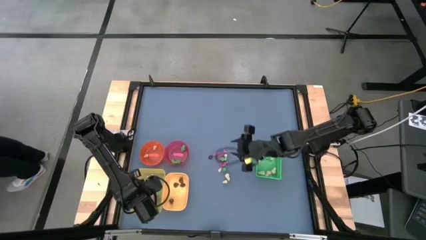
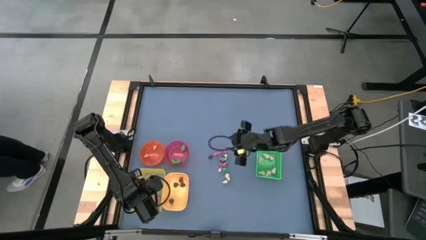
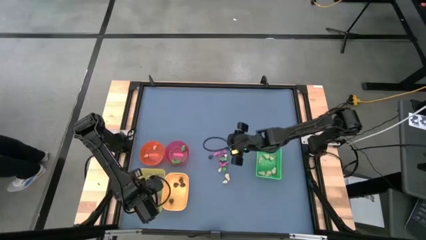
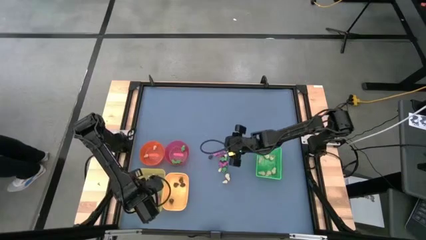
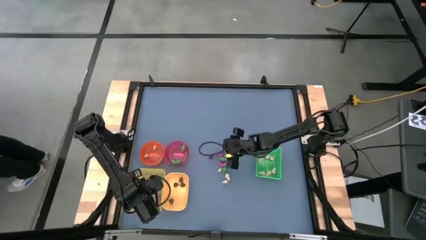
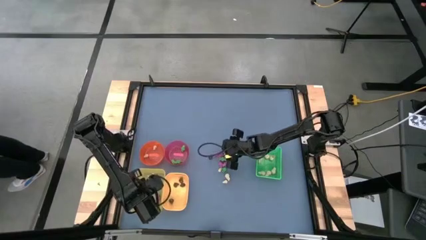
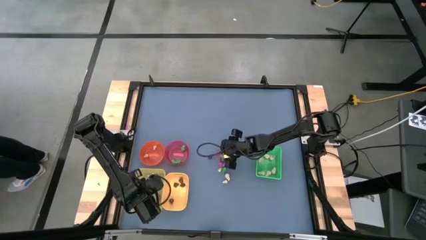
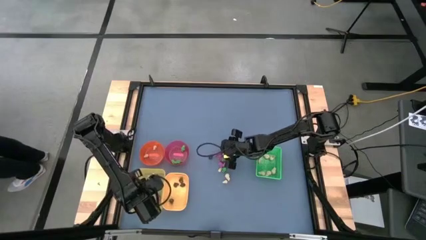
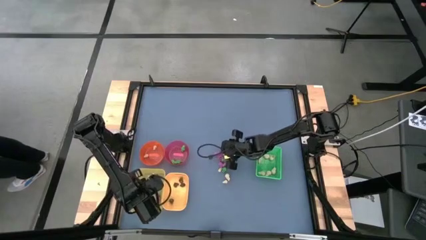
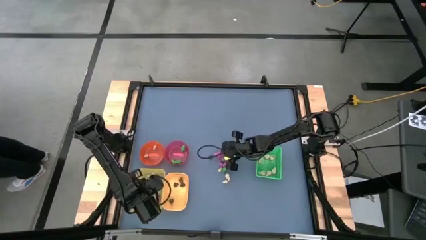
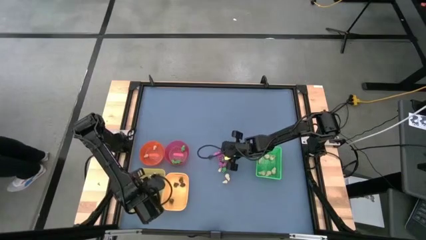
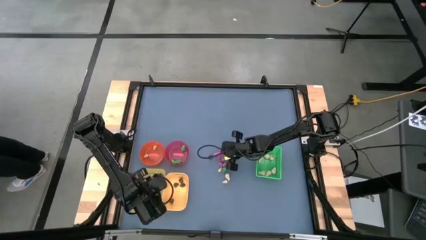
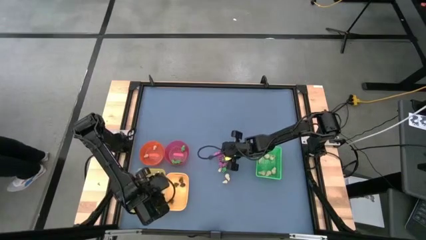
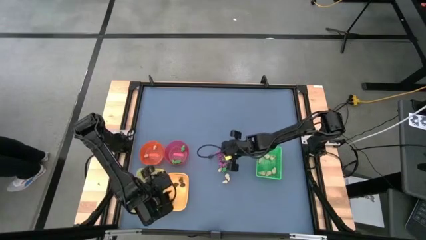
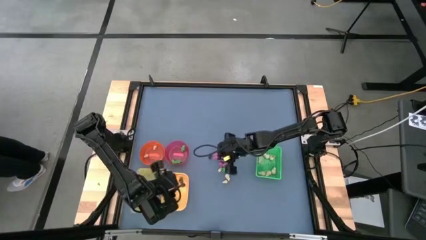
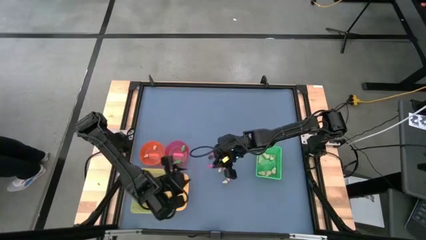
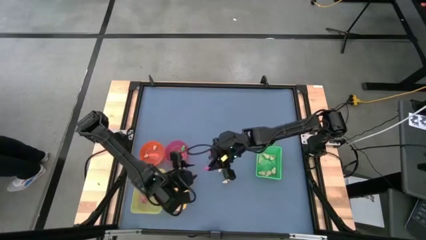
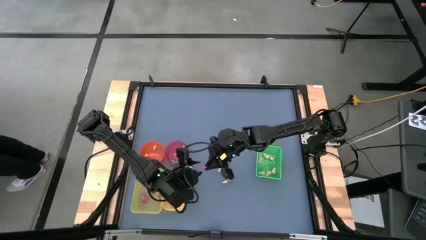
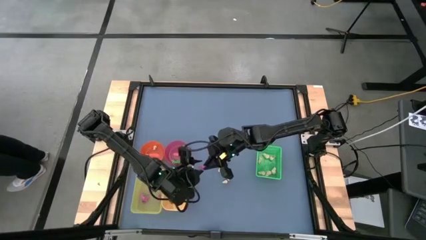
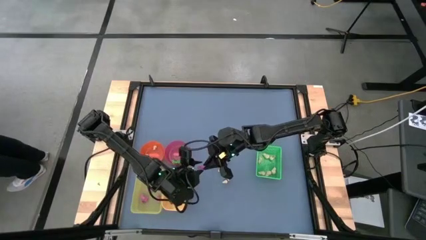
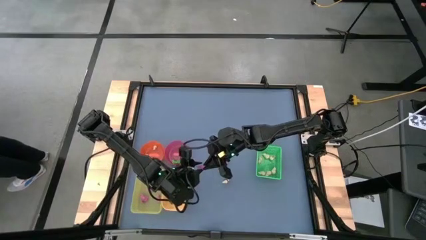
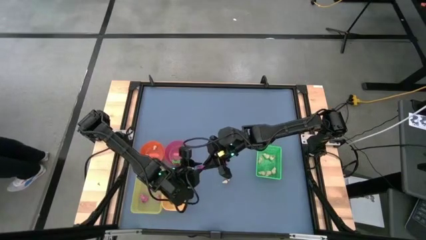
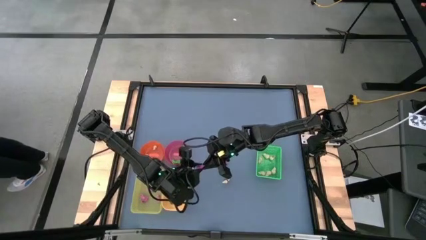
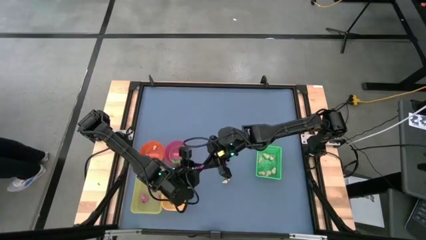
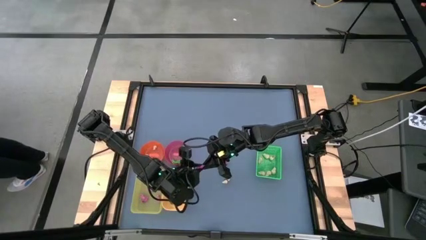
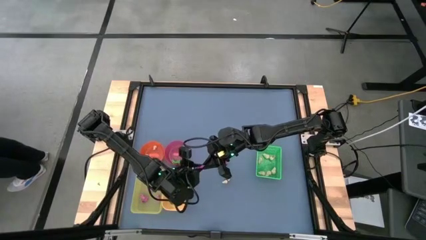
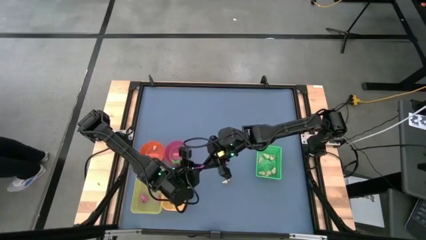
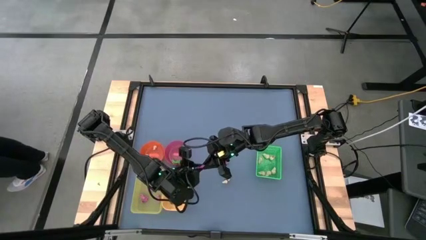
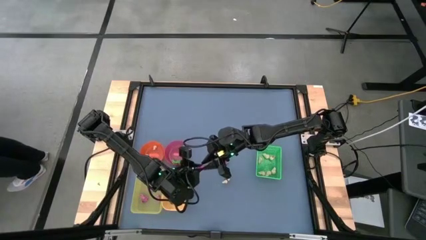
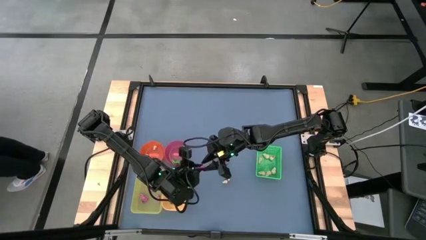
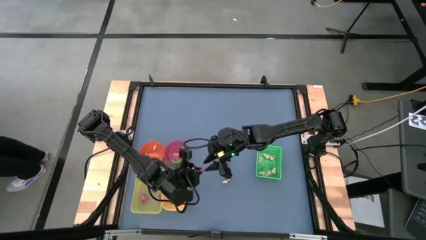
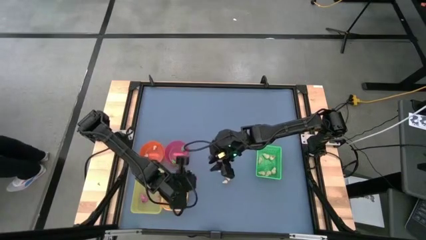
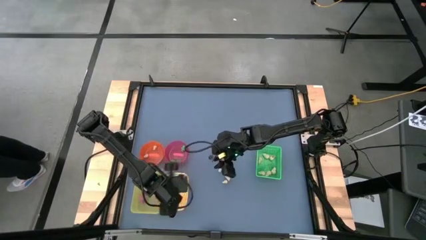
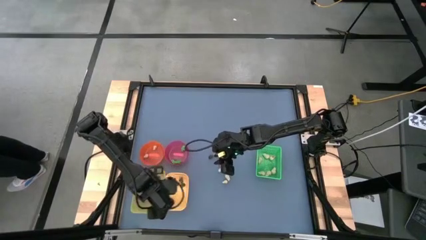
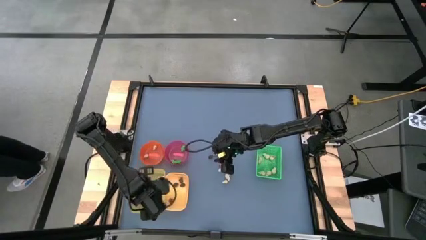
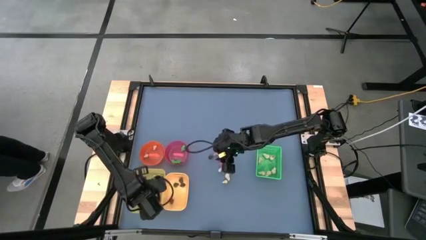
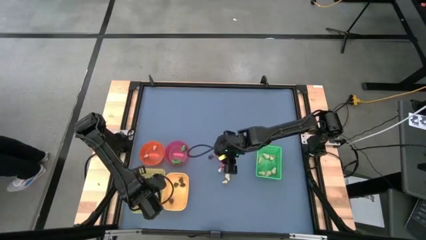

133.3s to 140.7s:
Task: Sort Halloween decoration
Put the pink skeleton toy into the light yellow bin

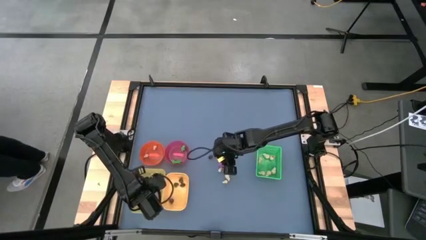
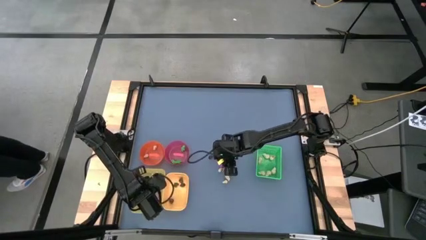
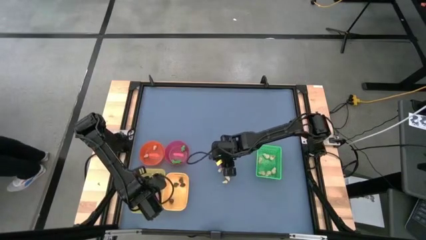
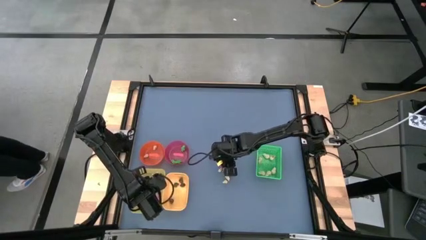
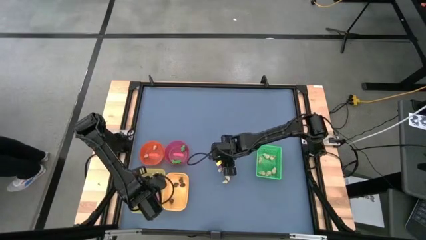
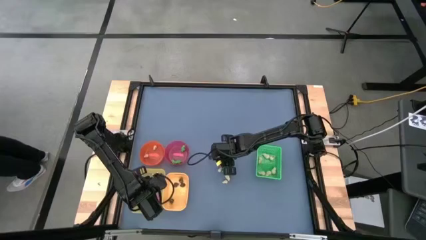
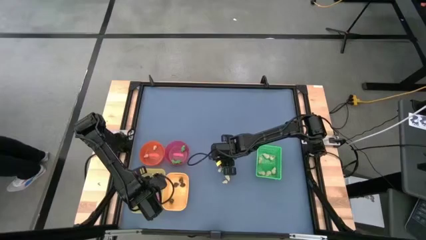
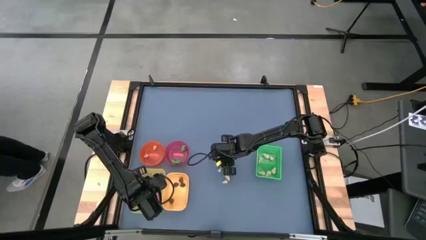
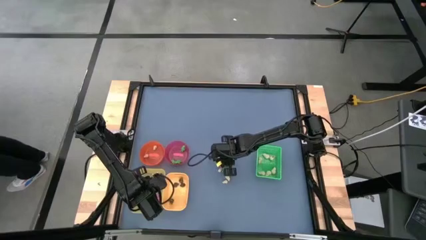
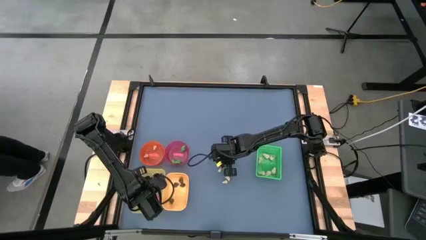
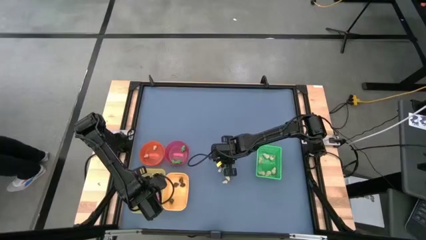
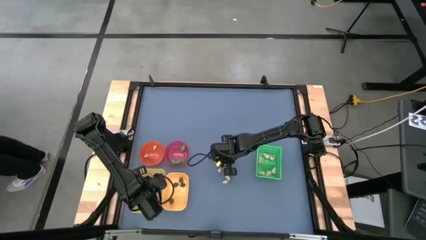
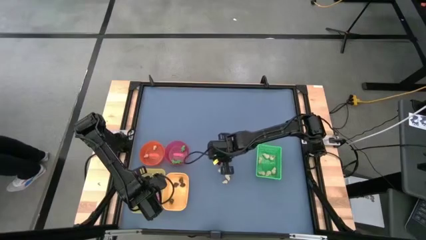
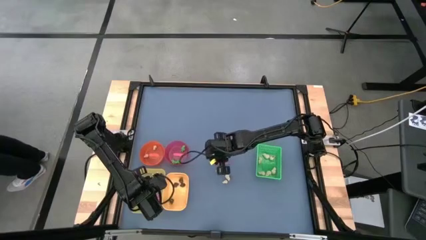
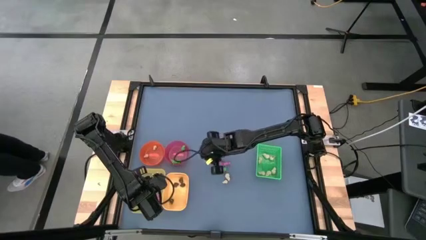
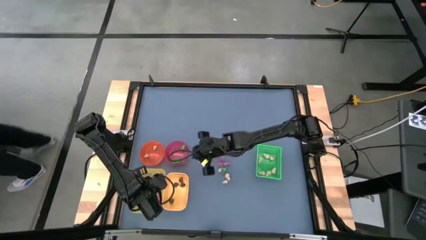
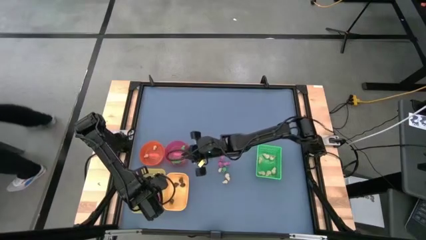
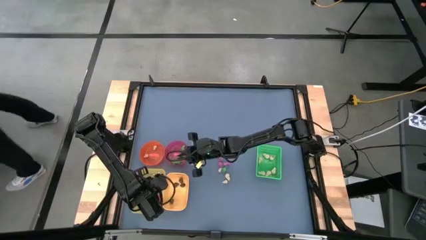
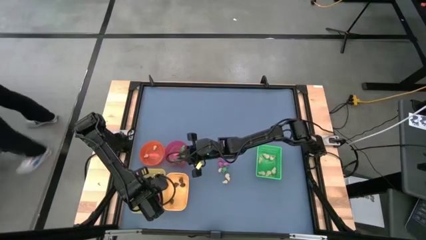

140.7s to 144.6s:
Put the green skeleton toy into the red bowl

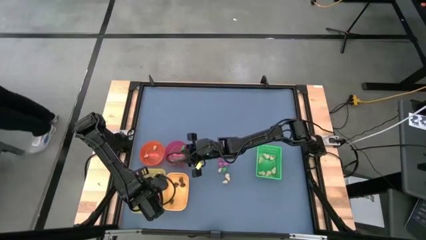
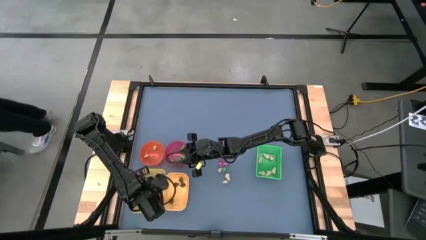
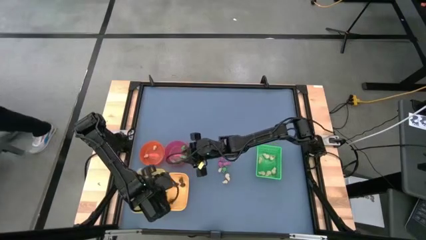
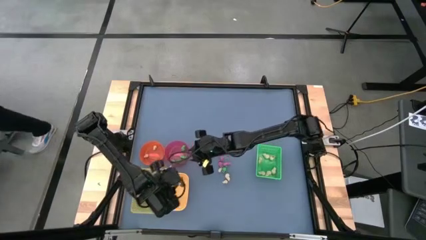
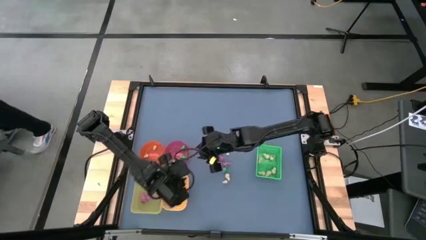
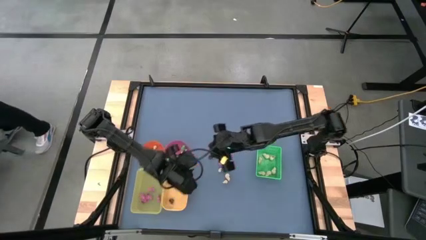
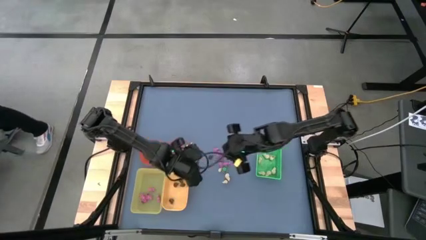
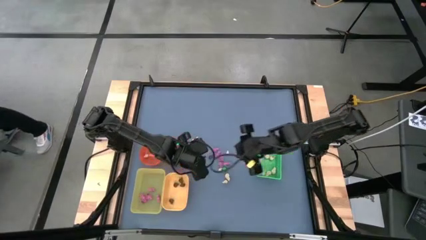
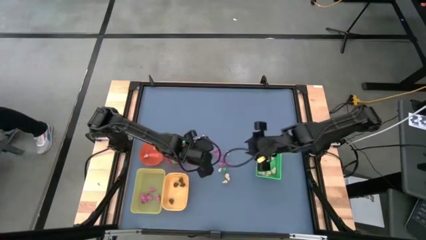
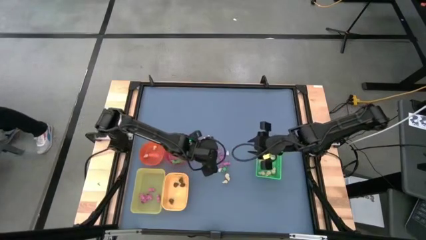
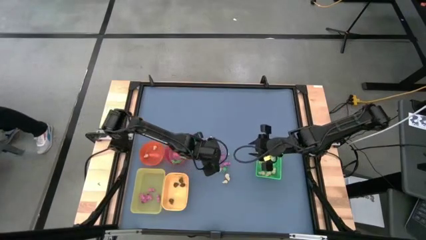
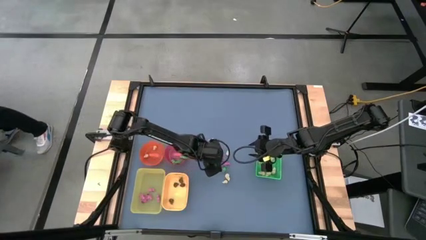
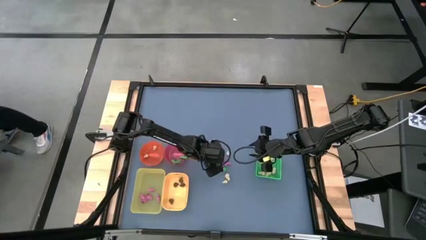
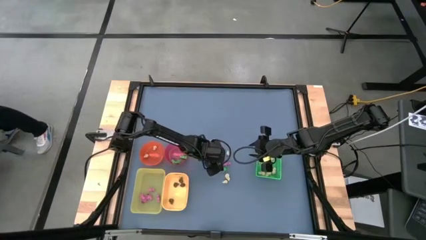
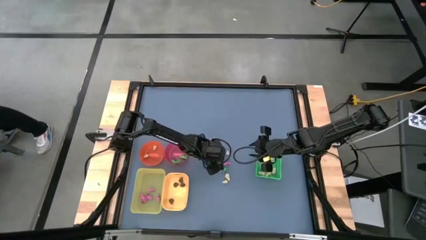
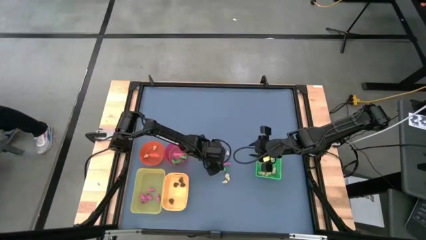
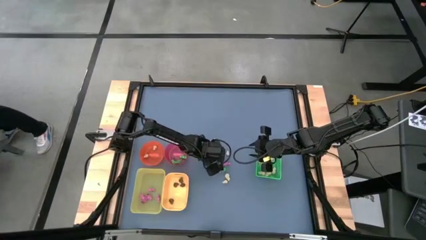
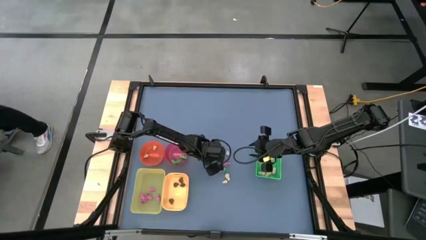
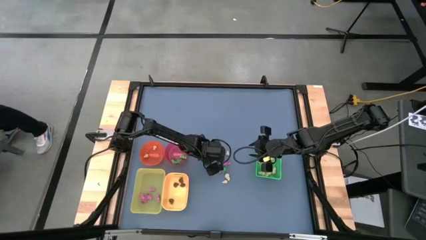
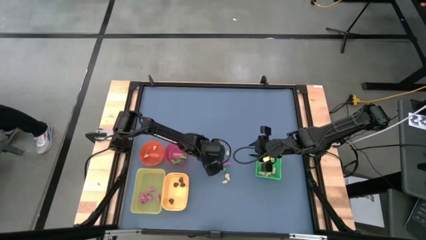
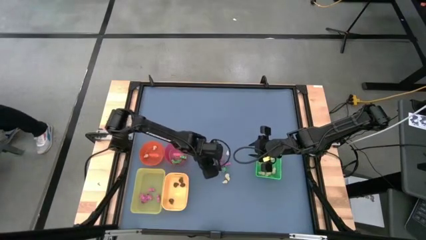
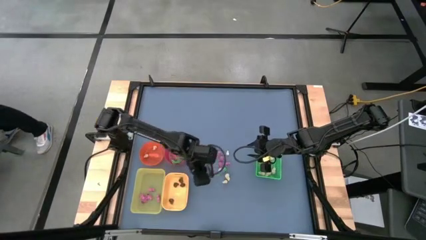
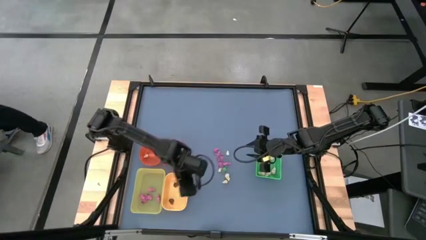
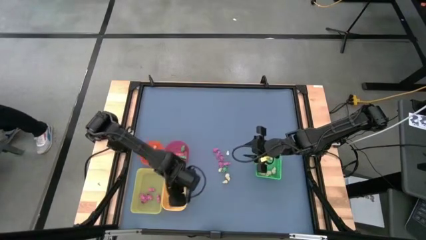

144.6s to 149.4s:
Put the black skull toy into the yellow bin
